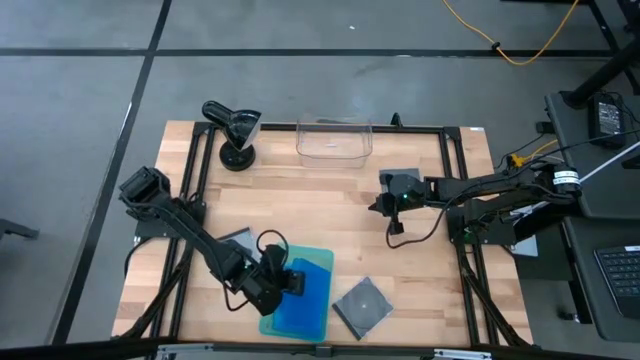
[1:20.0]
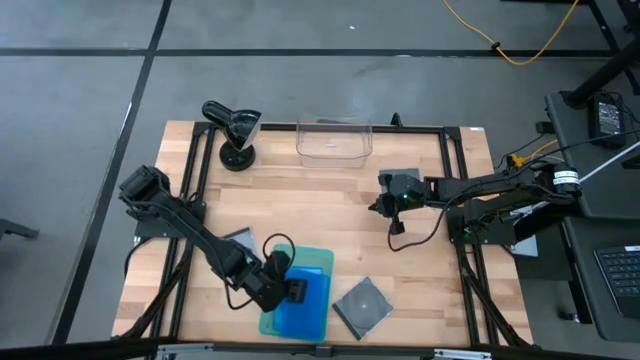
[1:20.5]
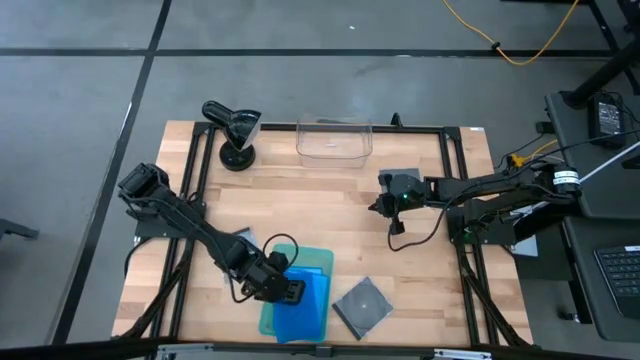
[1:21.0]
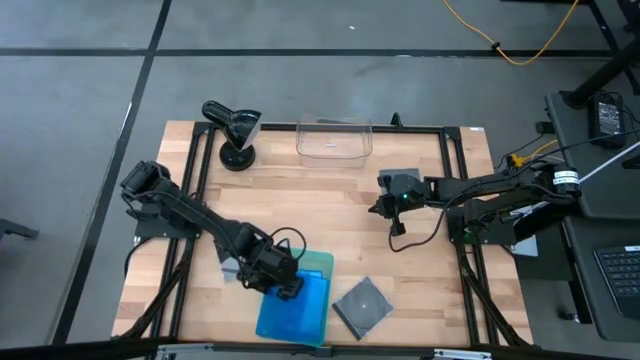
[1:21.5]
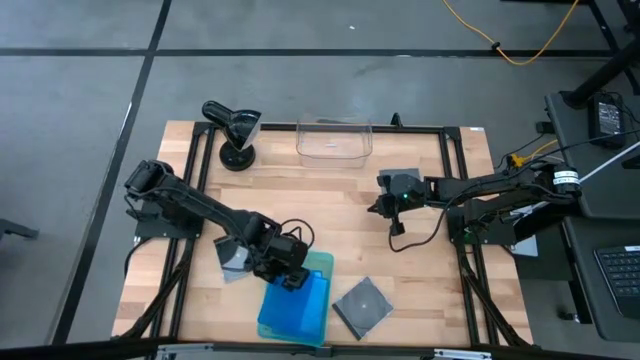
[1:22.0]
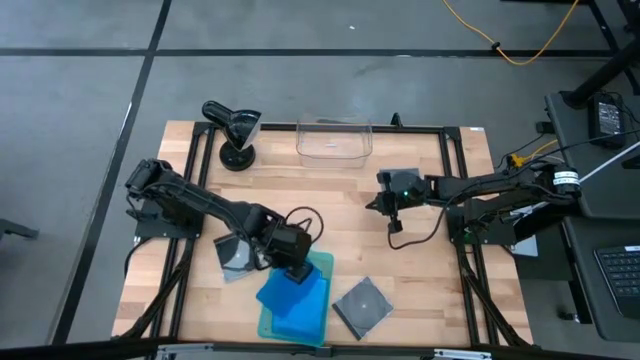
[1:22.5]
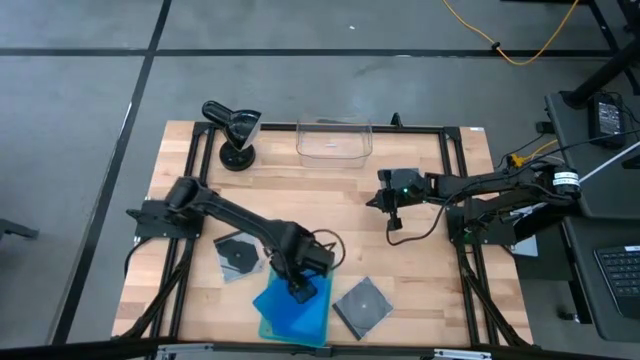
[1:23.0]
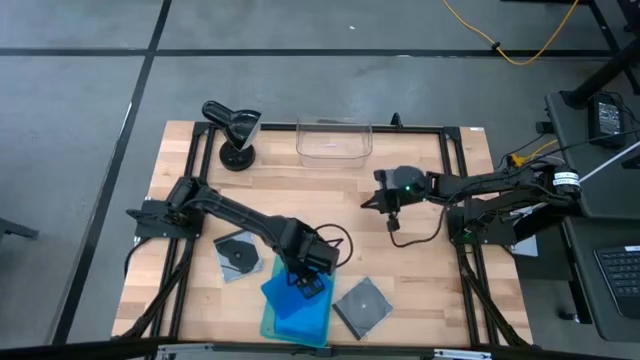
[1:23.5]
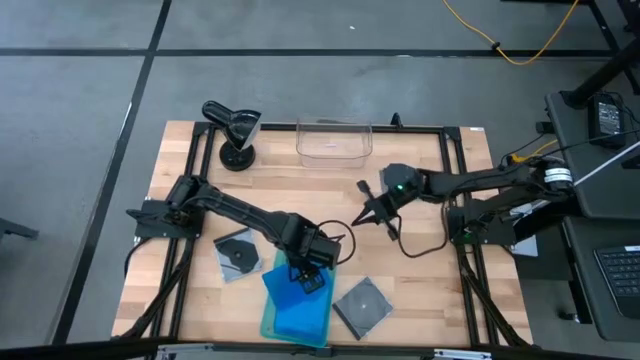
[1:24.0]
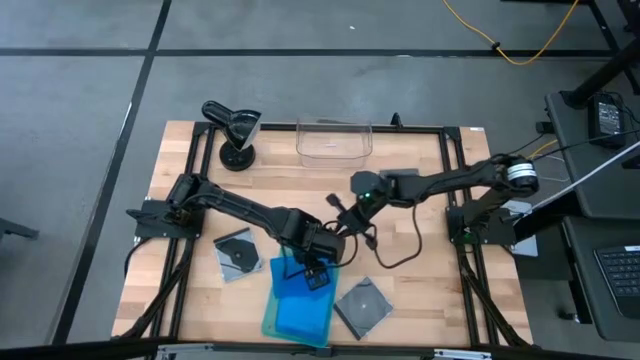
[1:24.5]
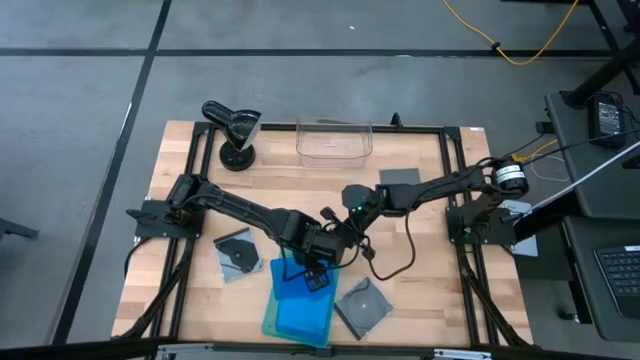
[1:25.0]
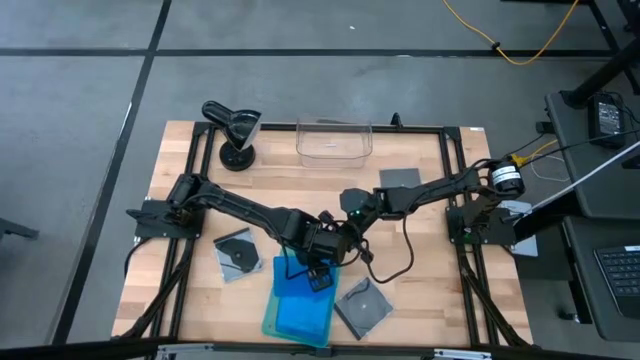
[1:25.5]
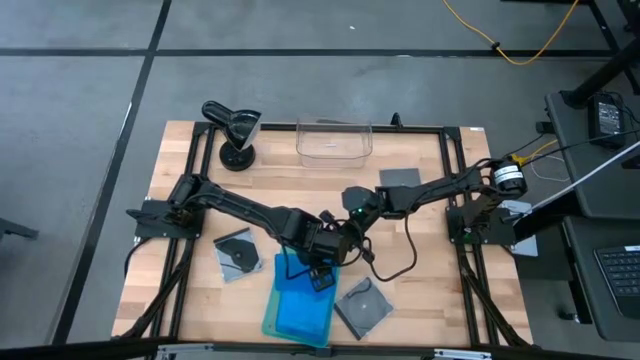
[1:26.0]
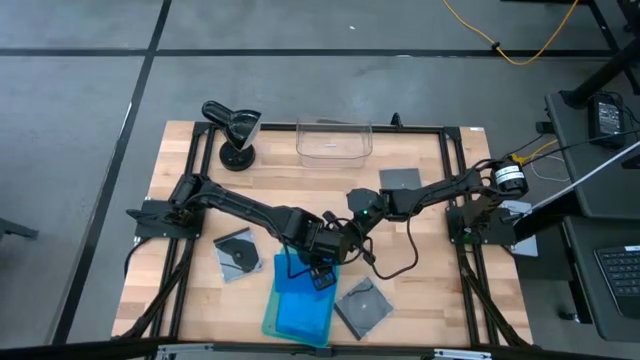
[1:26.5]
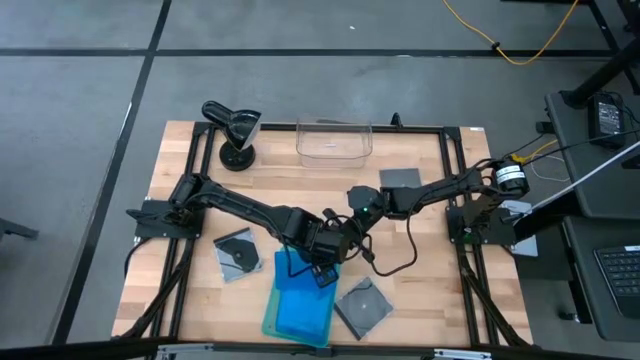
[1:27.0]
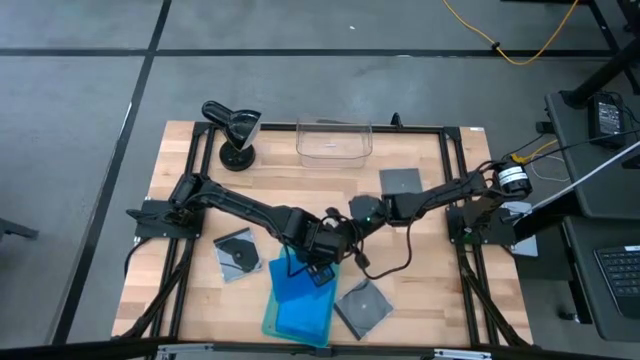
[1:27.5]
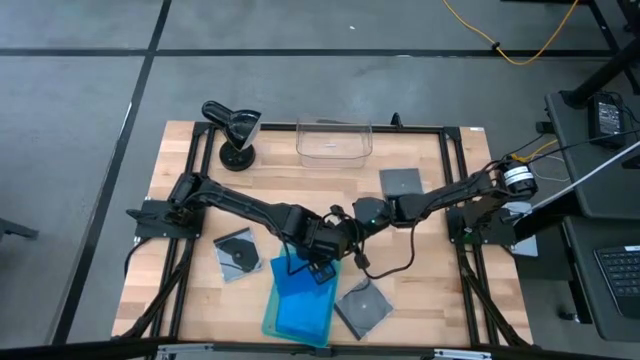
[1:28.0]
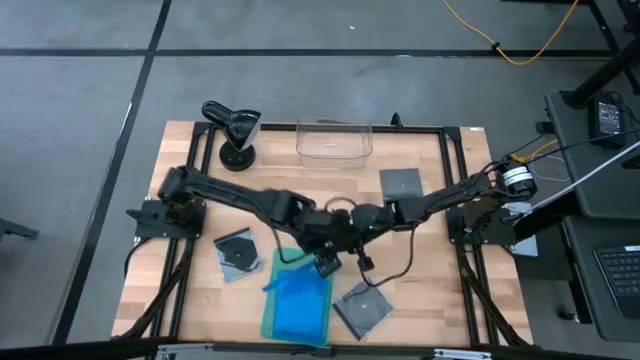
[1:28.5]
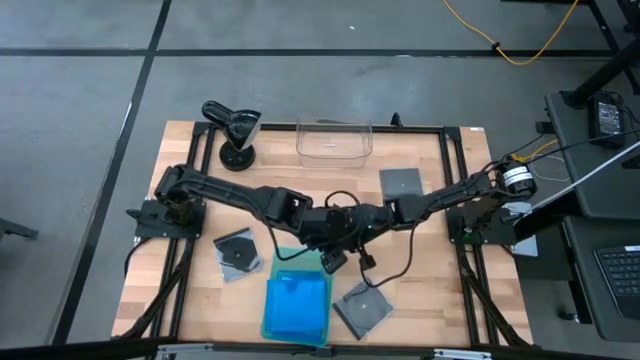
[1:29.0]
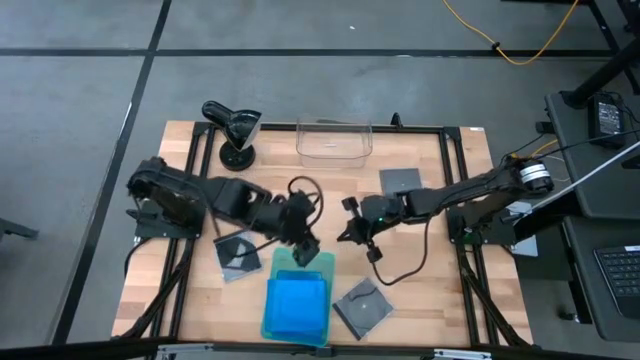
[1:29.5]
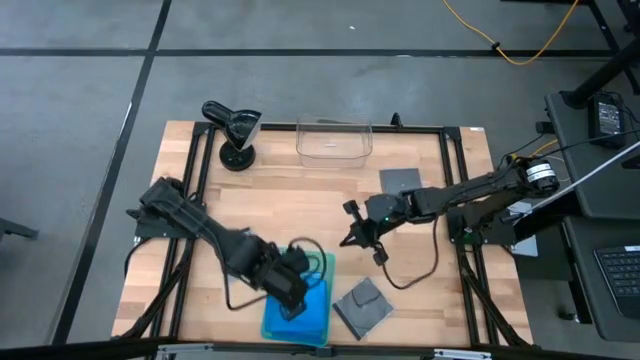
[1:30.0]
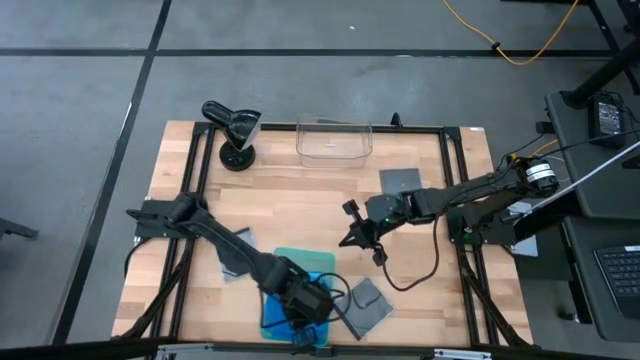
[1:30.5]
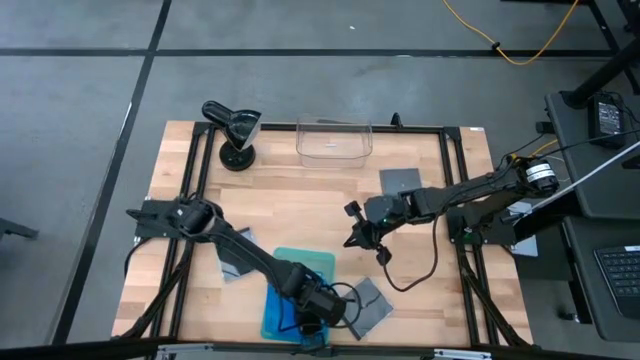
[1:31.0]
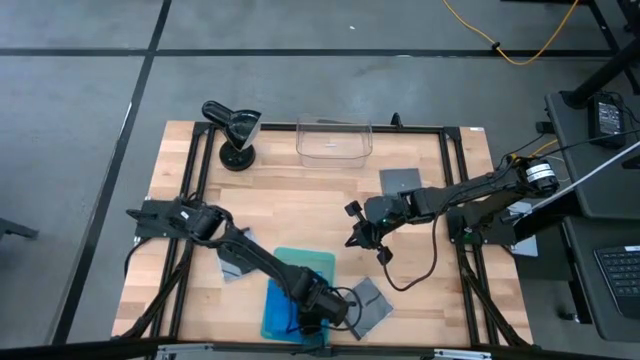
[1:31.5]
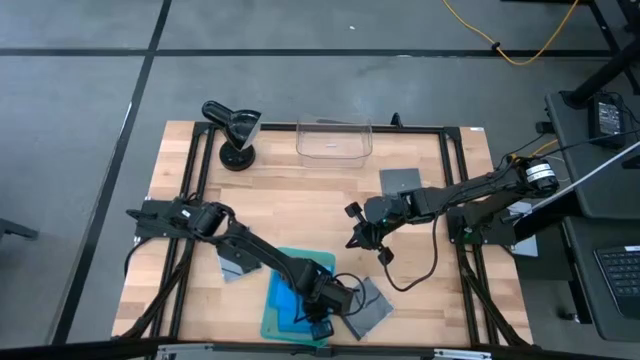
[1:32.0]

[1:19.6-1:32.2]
Task: Pick & place jewel cases by type
Put the blue cd case into the green bin

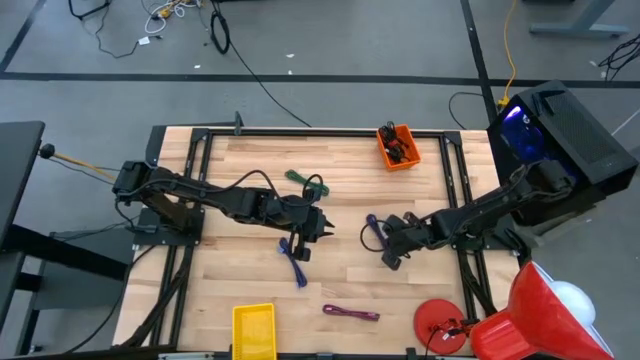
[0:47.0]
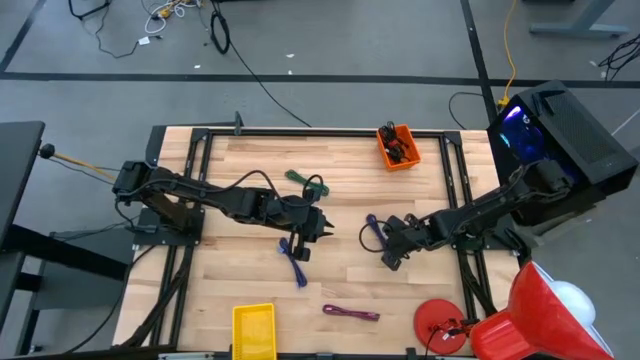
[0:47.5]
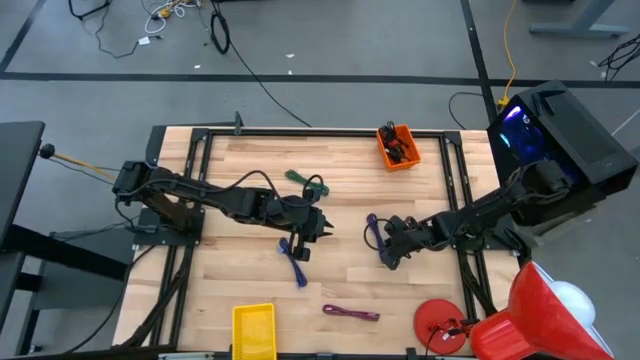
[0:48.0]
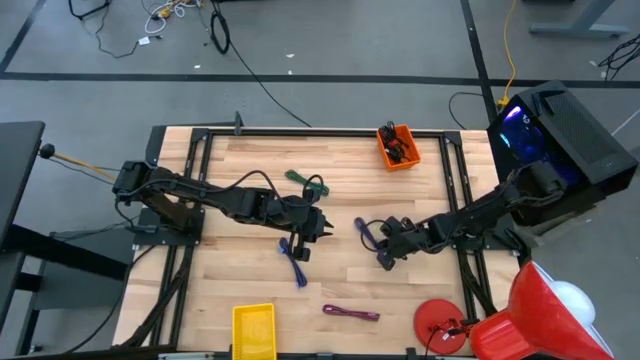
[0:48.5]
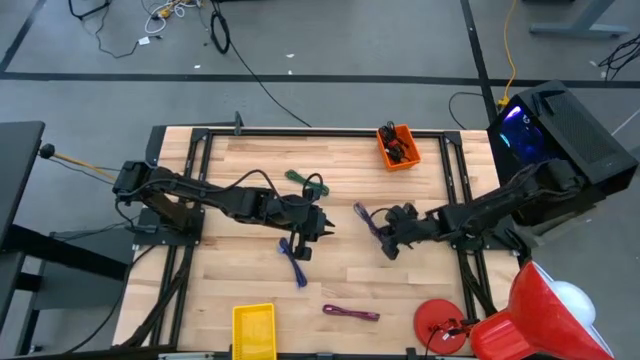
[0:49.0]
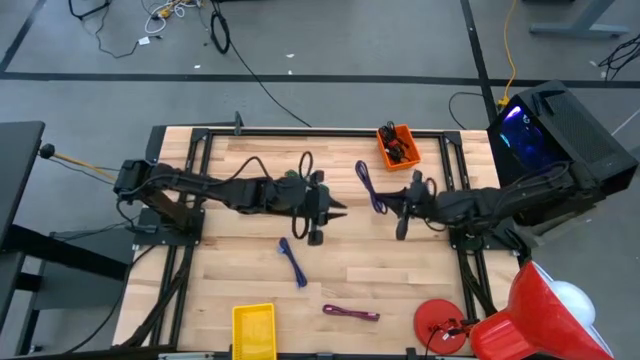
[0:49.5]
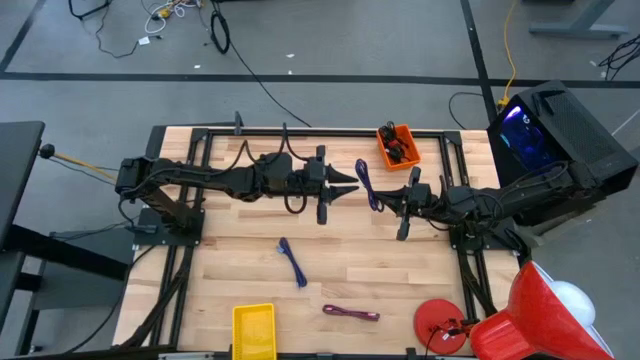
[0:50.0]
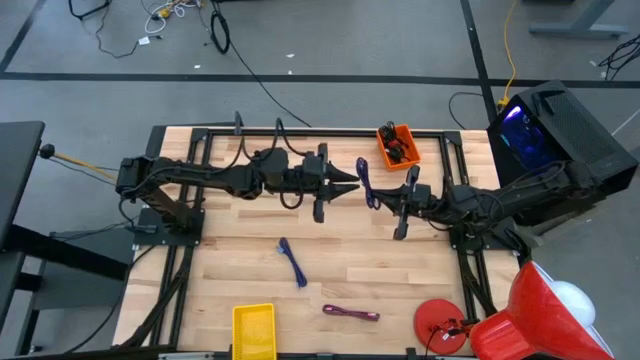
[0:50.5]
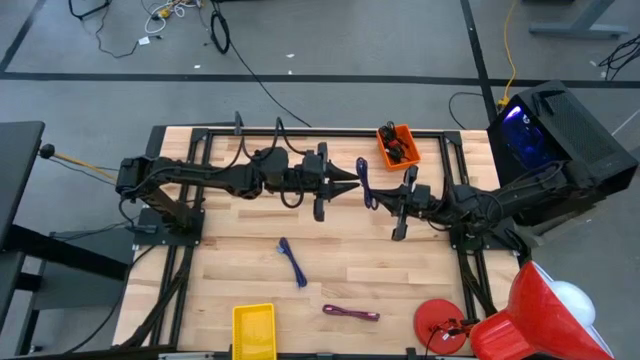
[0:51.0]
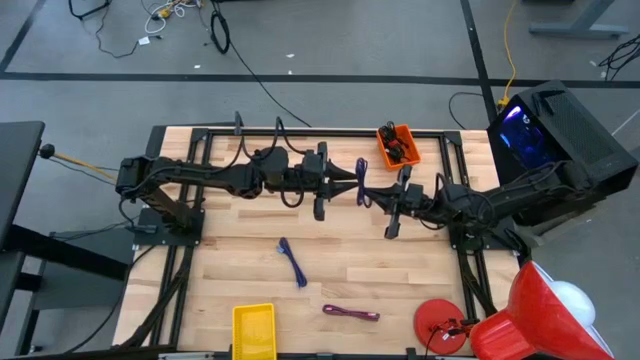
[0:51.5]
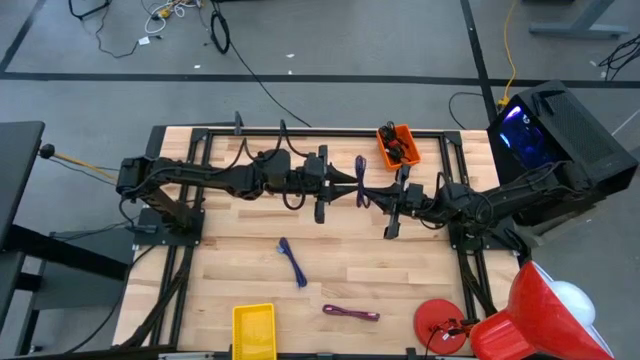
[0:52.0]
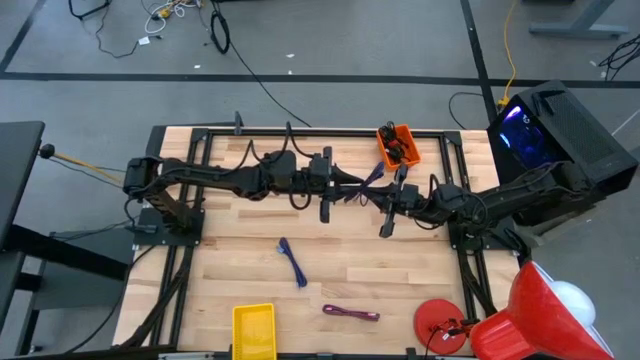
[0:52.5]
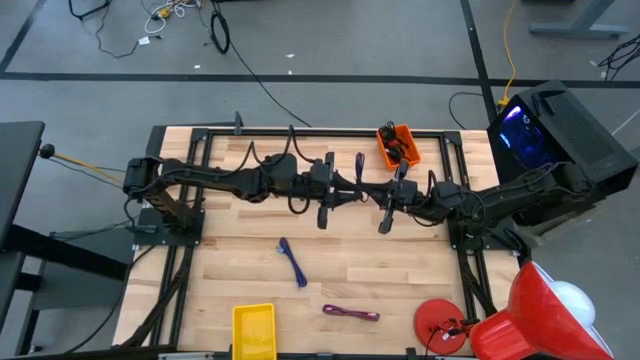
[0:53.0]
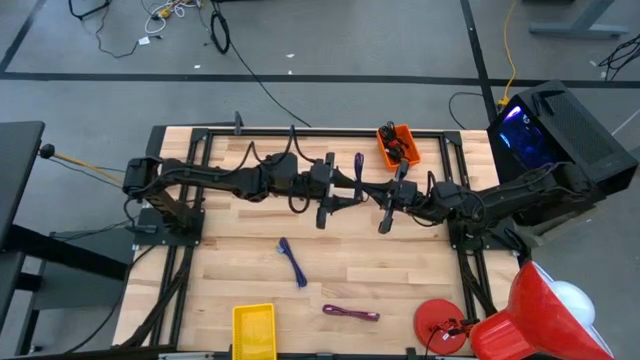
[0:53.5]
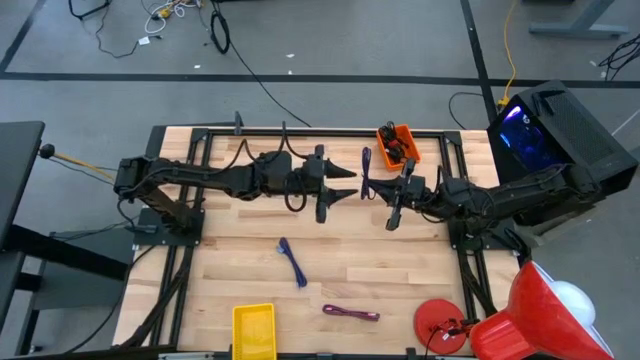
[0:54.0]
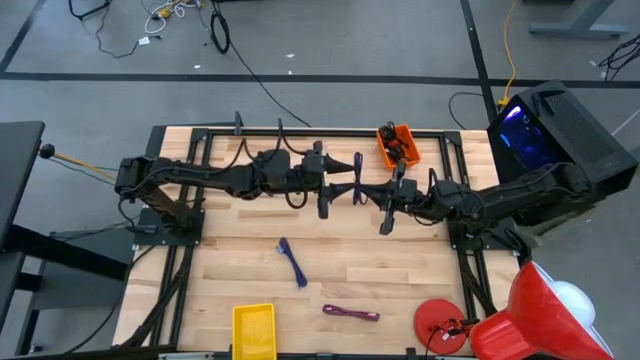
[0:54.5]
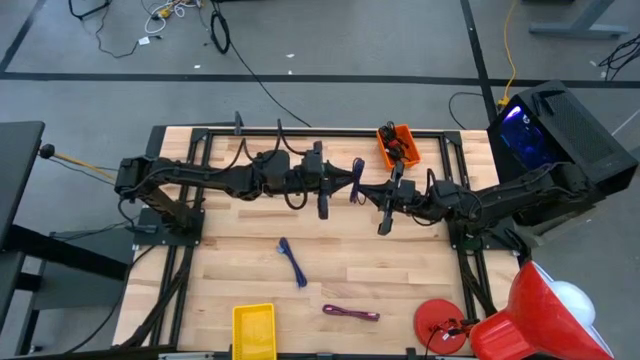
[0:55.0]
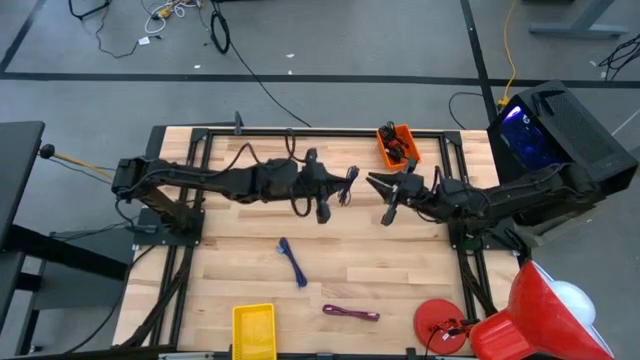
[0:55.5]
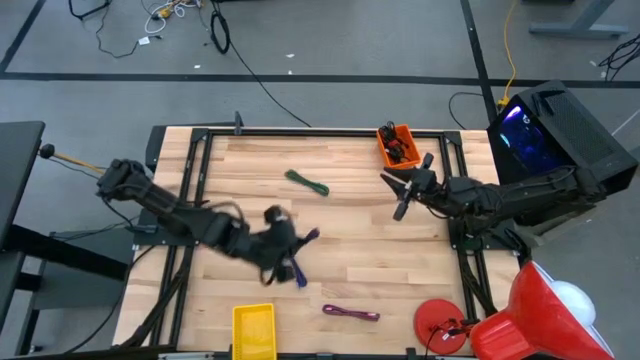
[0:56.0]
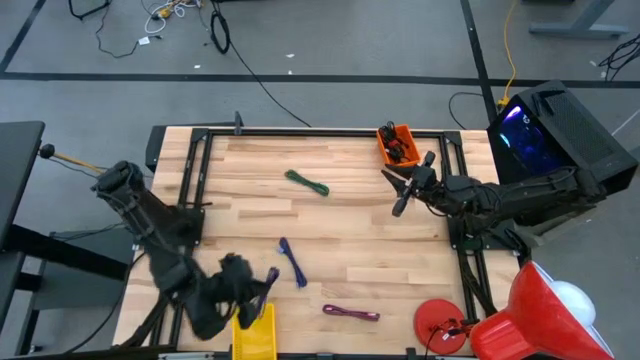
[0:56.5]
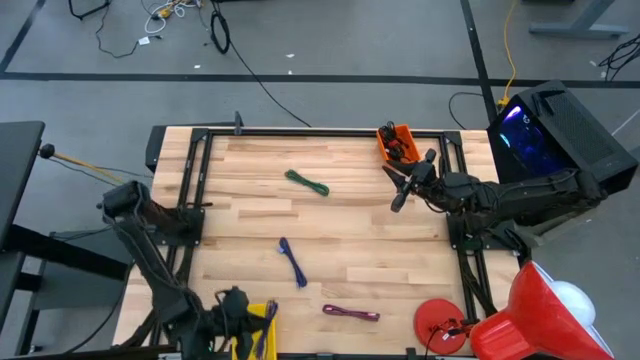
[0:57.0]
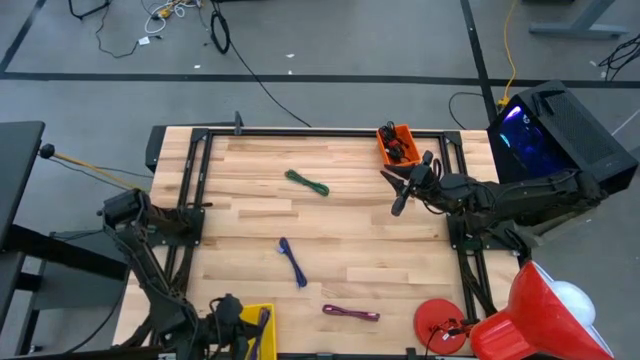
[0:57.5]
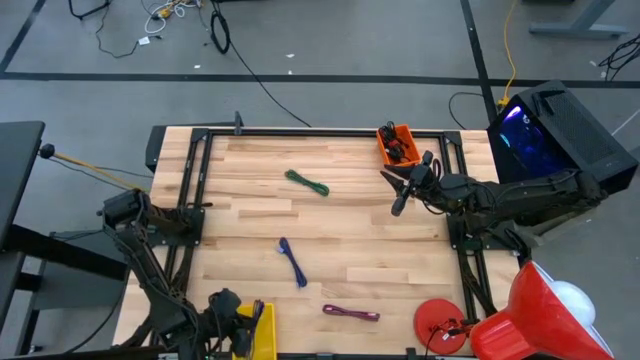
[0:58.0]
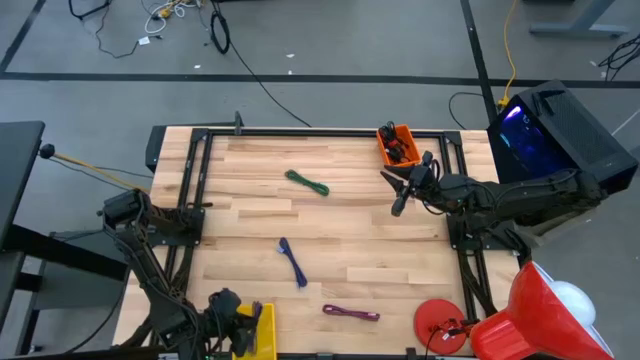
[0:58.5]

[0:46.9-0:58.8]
Task: Pick & Place USB Port
Put the right blue and black charger cable into the yellow bin
